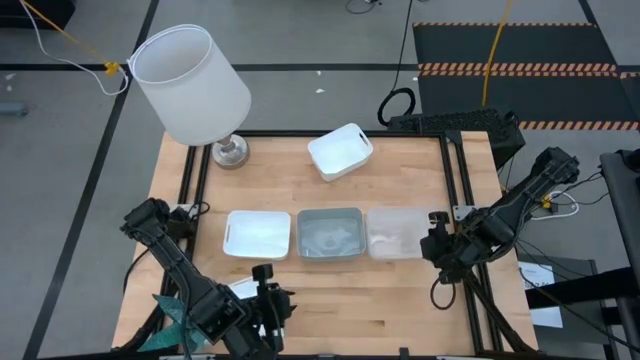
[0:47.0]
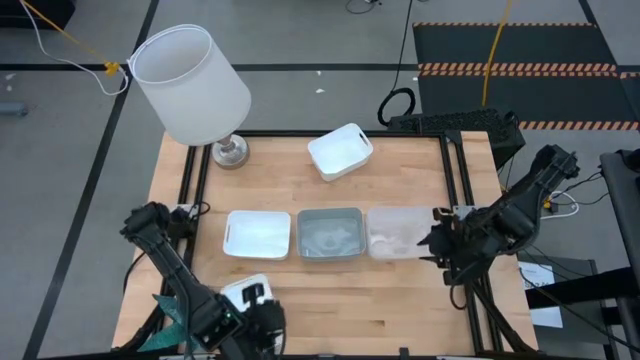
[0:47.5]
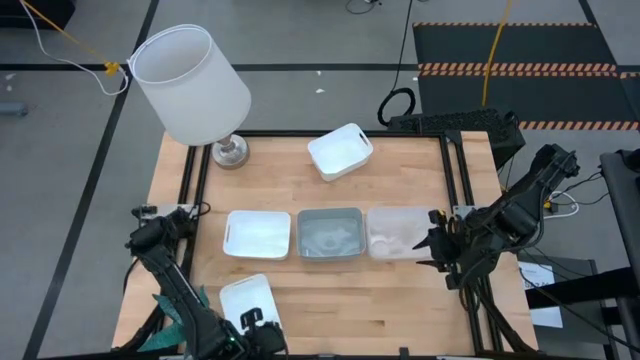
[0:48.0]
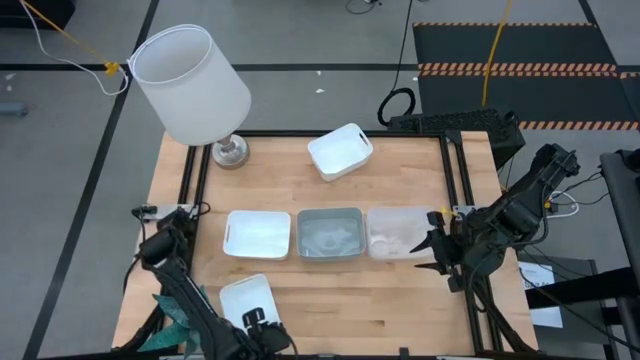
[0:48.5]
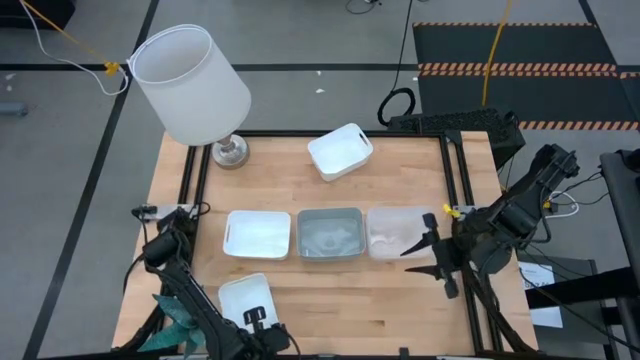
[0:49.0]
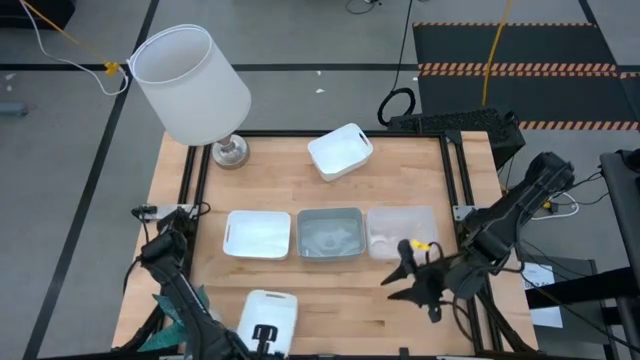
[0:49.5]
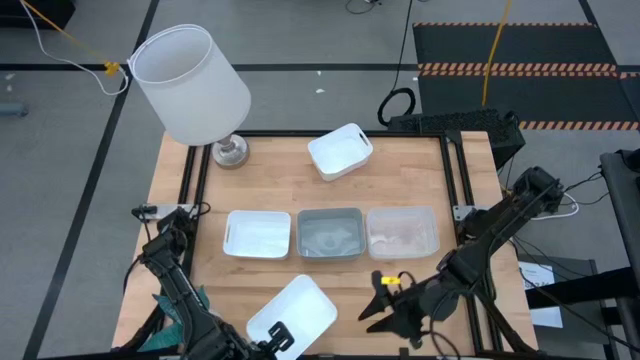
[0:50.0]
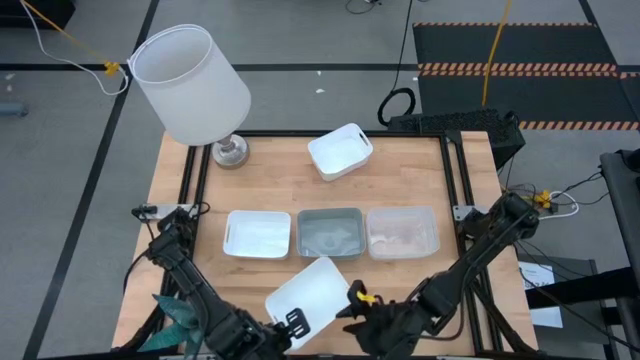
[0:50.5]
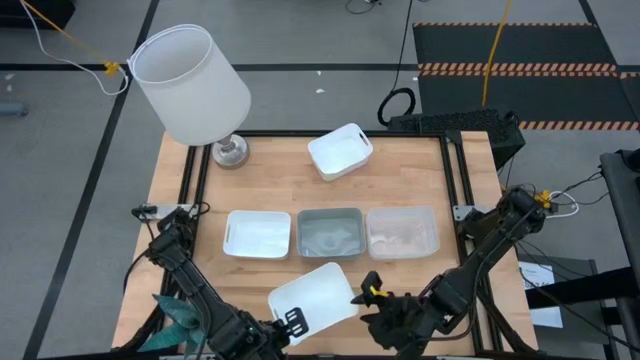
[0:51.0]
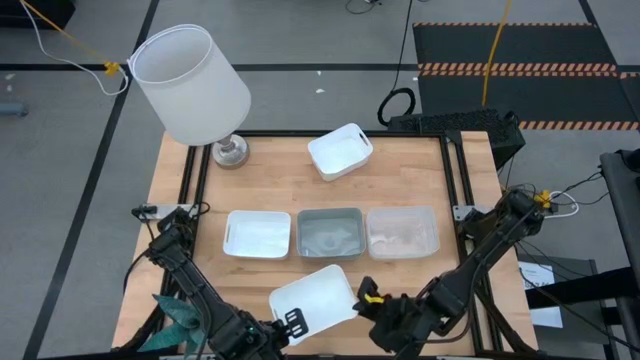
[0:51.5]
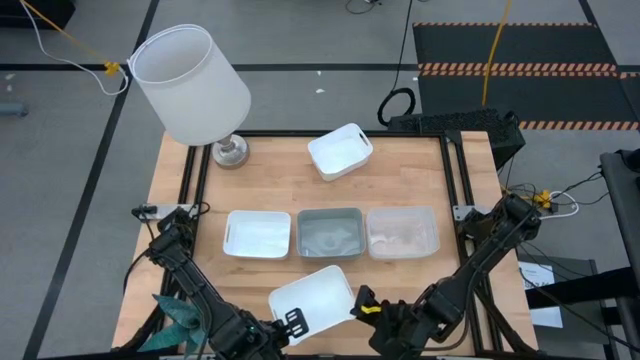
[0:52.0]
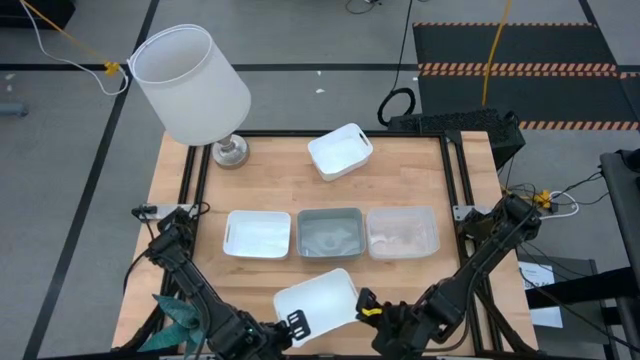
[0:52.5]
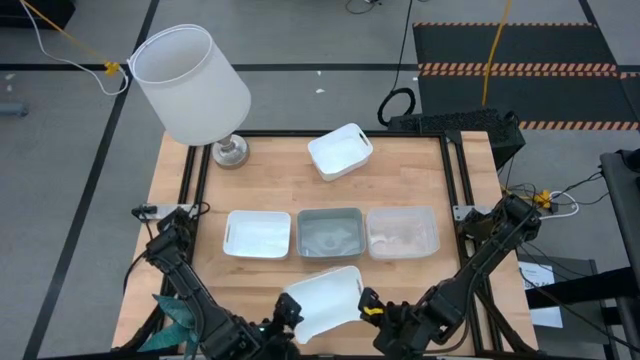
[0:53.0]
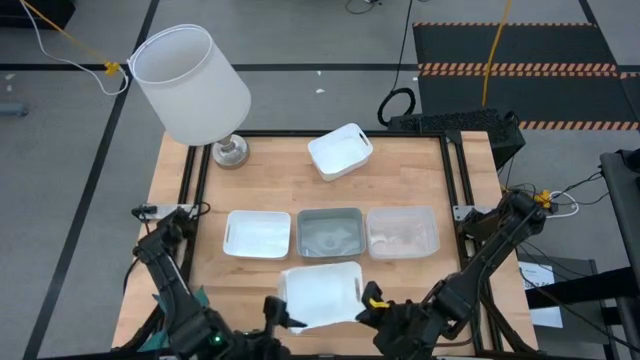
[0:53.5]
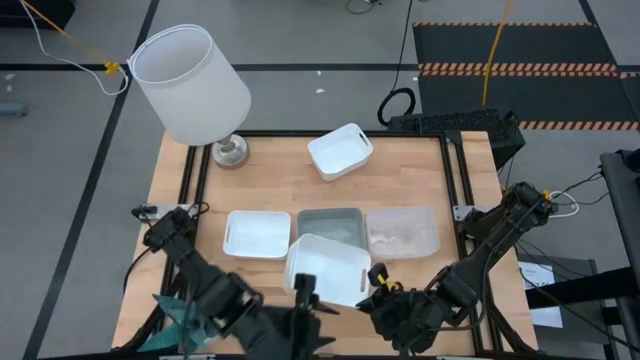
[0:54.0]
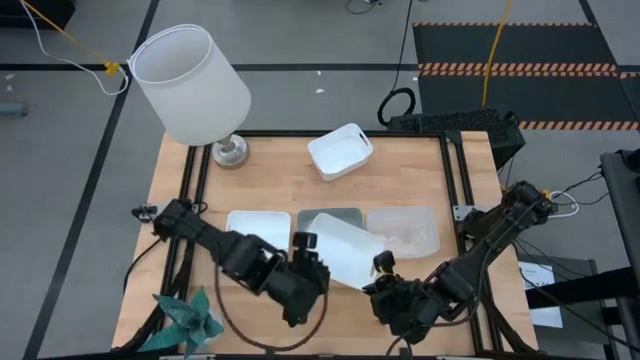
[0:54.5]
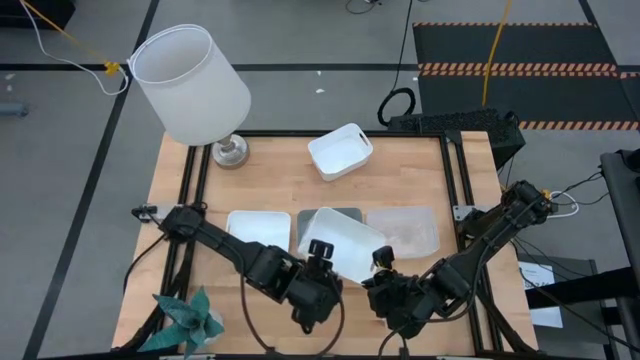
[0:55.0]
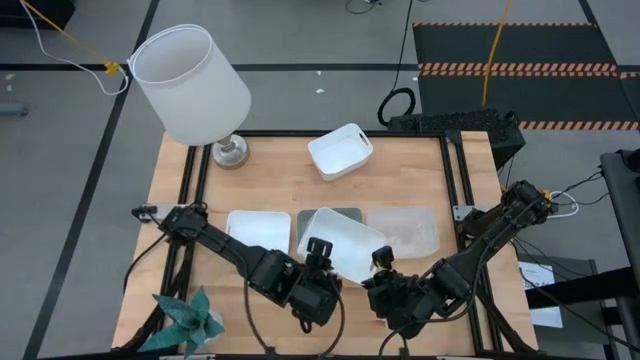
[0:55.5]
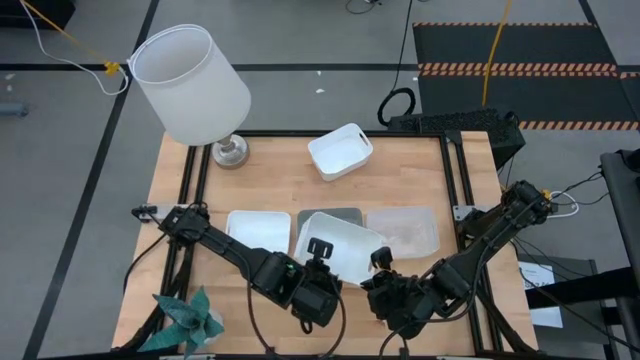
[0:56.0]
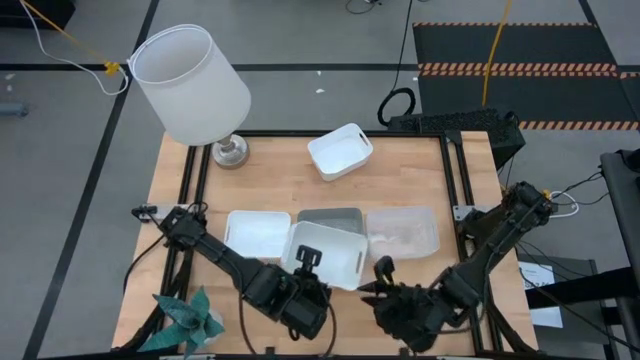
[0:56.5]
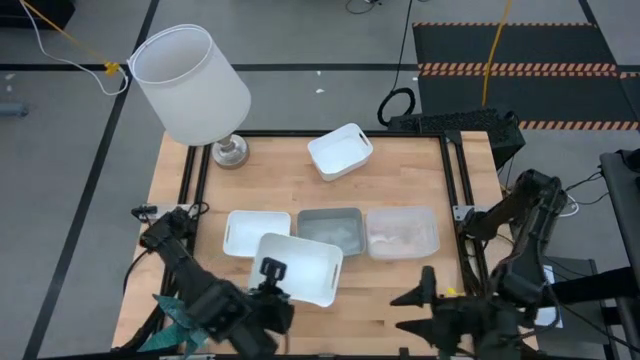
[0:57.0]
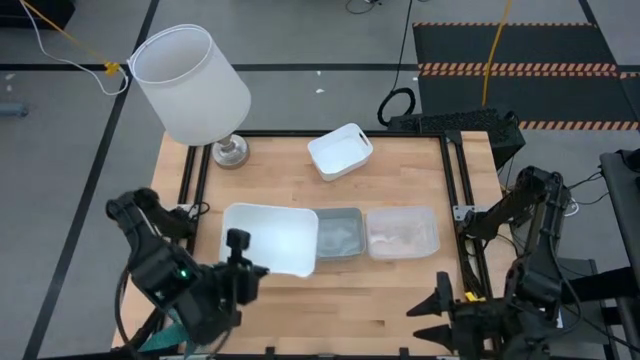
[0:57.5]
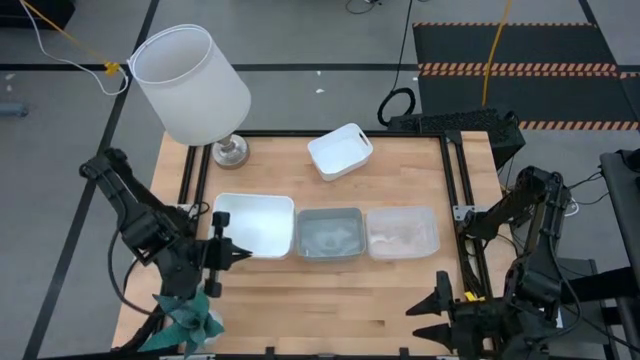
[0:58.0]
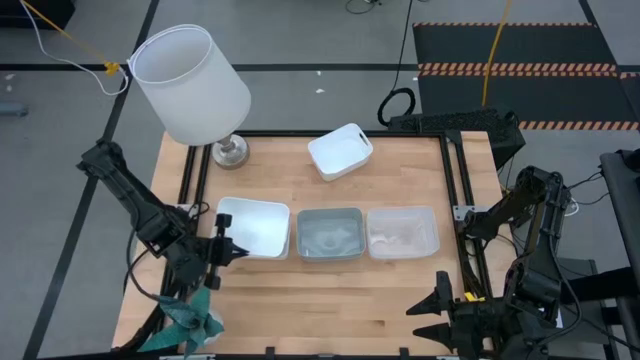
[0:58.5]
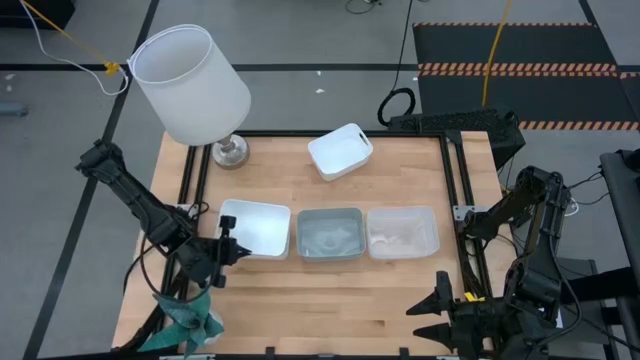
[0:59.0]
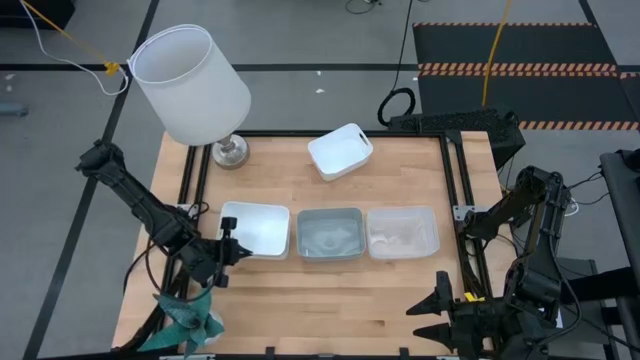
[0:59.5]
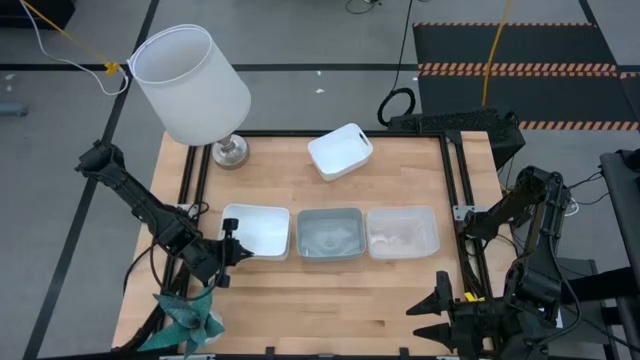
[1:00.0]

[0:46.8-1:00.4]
Stack the bottom white bin on the middle white bin

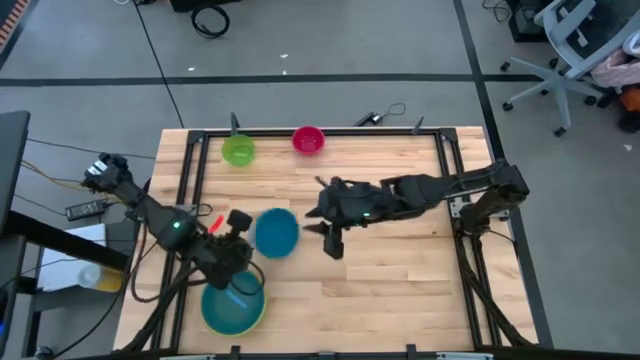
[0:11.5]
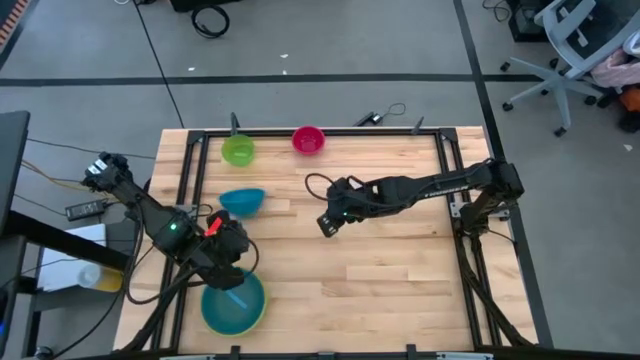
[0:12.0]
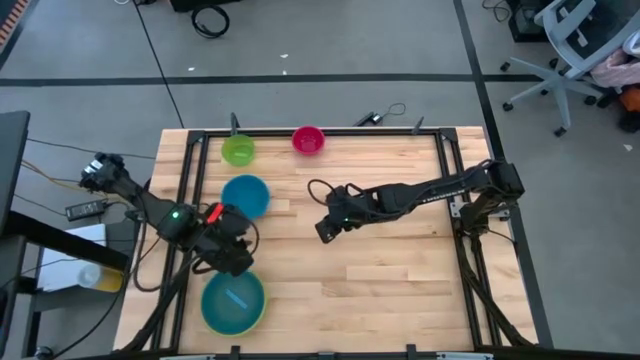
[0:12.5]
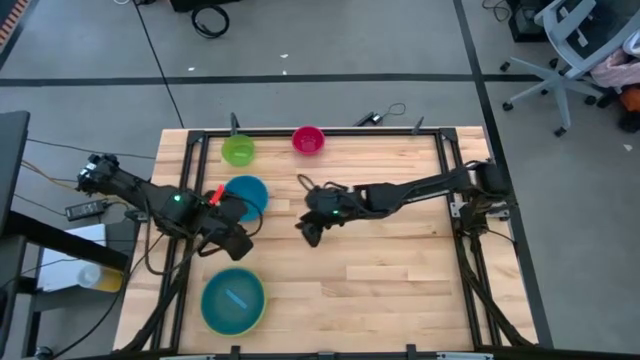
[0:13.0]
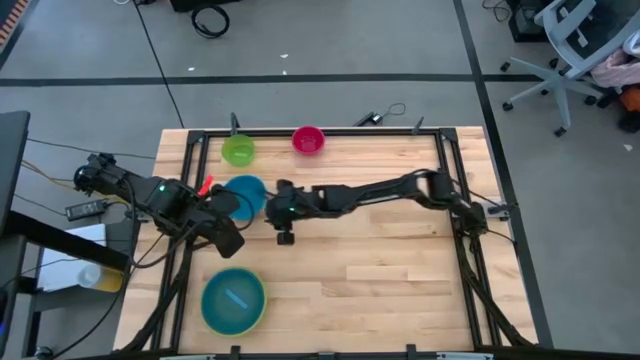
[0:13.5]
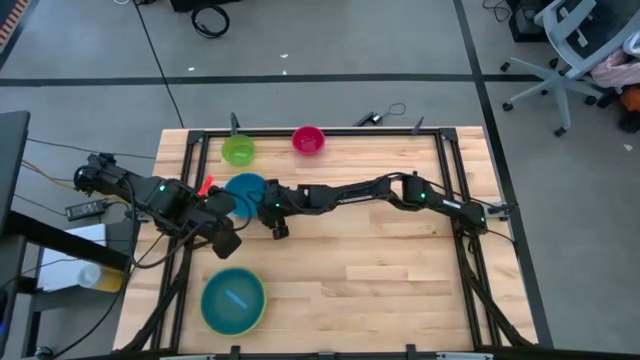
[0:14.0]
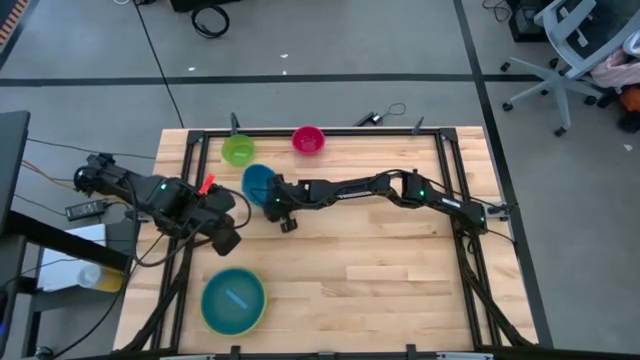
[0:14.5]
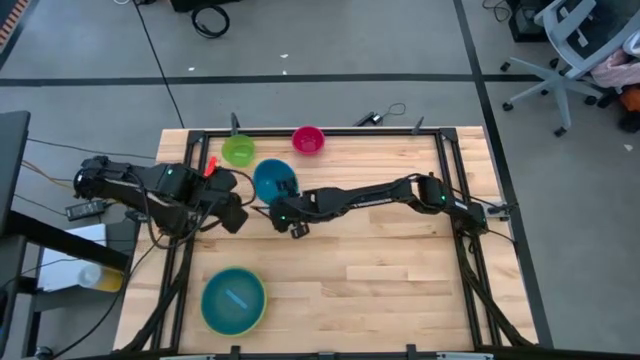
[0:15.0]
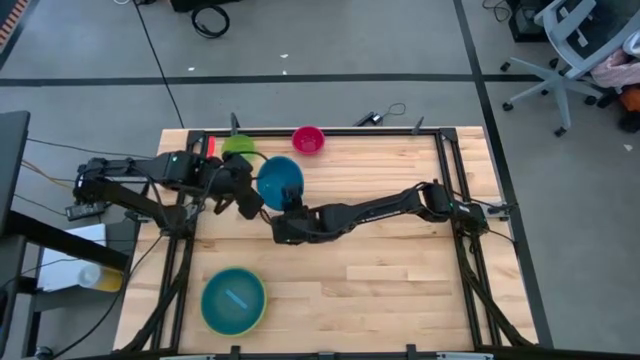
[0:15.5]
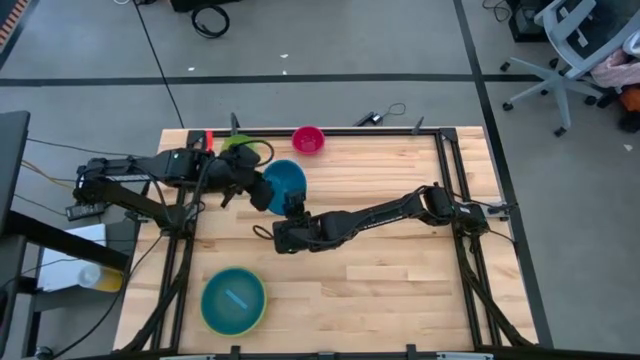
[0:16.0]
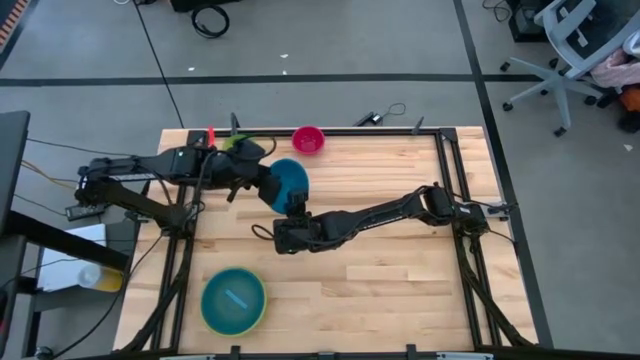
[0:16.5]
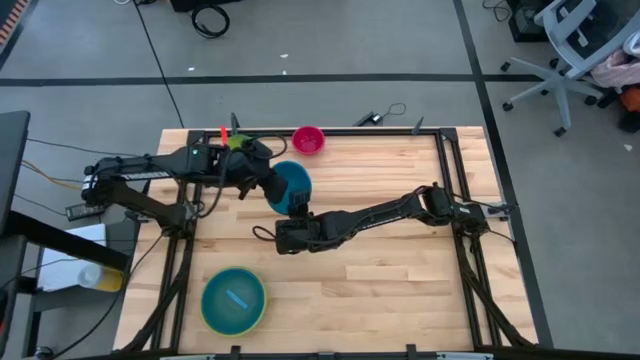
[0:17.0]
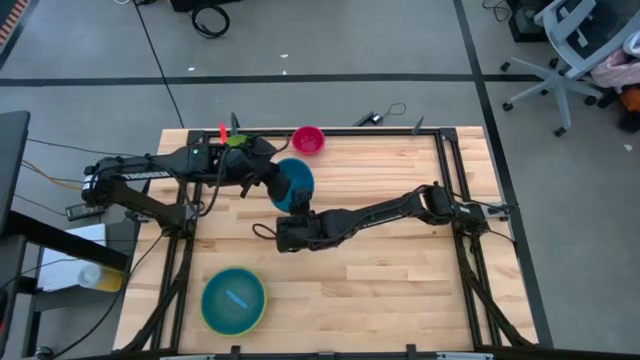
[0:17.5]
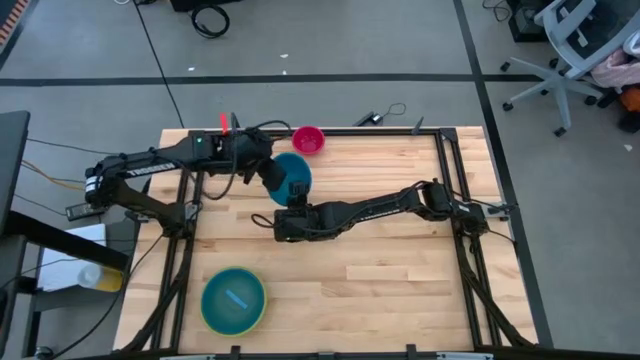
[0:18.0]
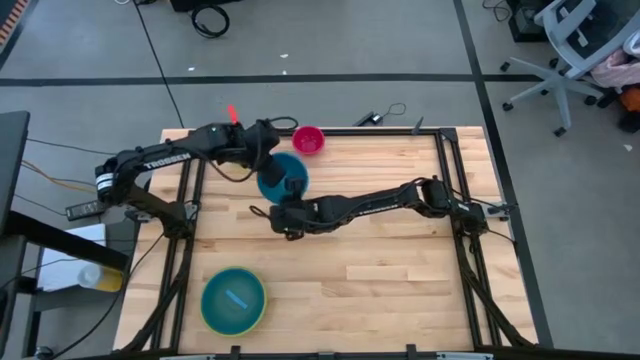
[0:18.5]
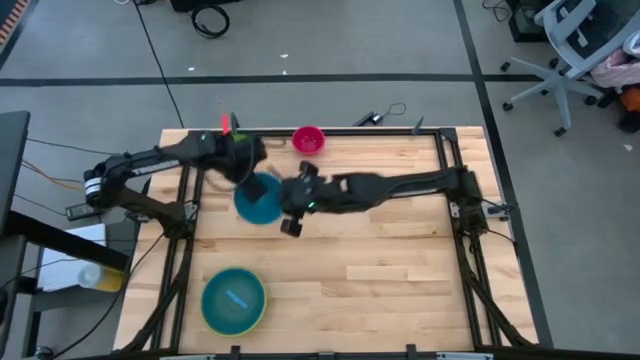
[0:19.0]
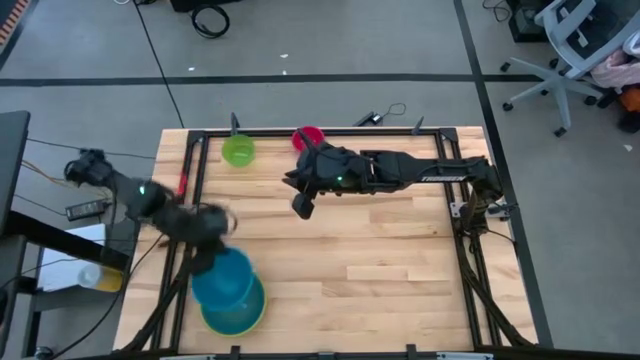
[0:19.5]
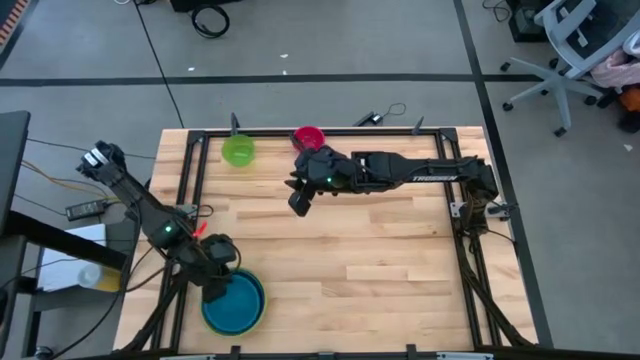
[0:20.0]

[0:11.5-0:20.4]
Stack the blue bowl on top of the light blue bowl
